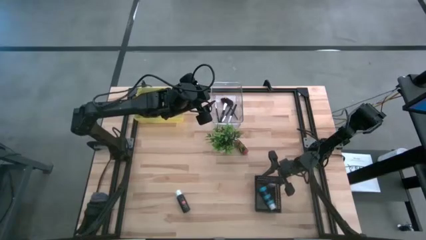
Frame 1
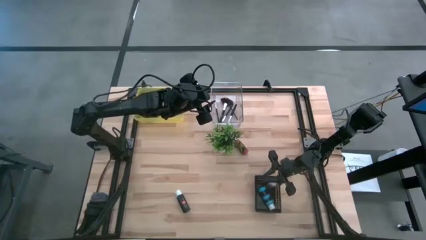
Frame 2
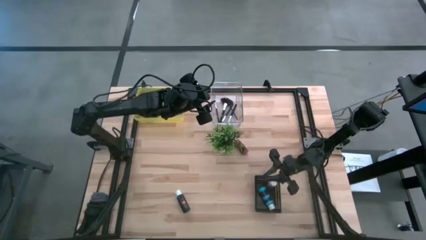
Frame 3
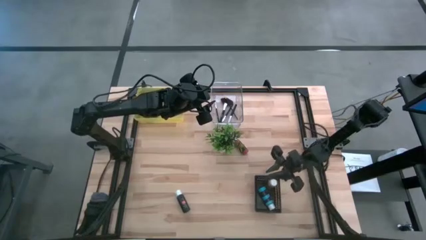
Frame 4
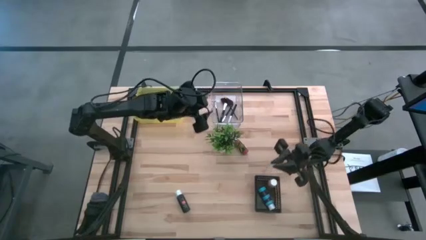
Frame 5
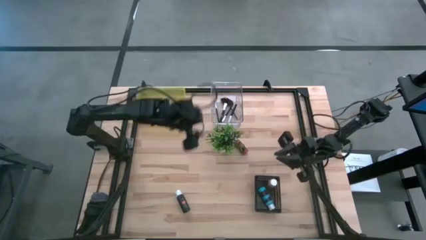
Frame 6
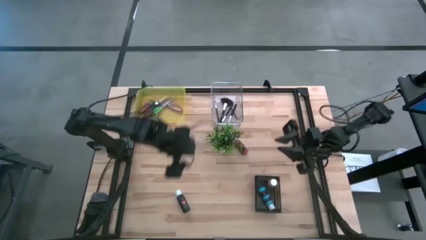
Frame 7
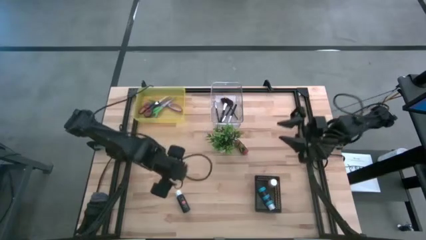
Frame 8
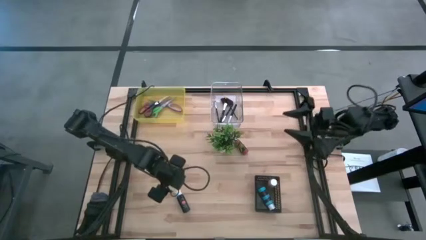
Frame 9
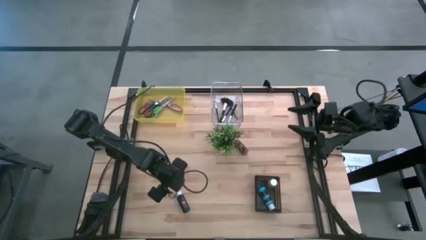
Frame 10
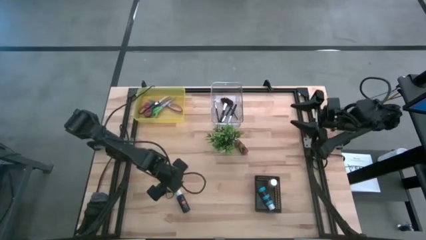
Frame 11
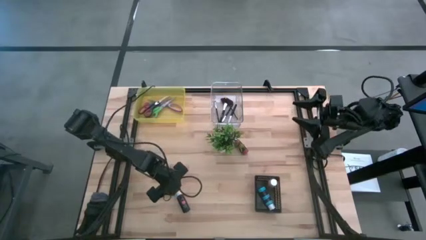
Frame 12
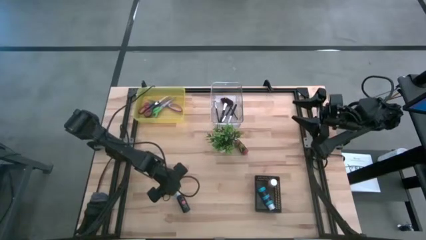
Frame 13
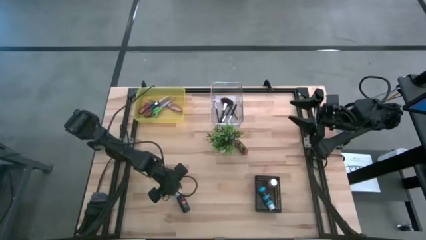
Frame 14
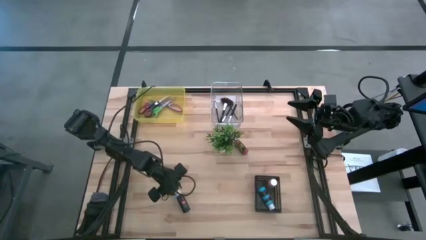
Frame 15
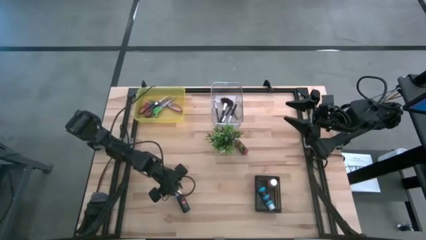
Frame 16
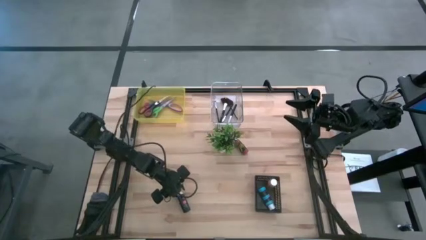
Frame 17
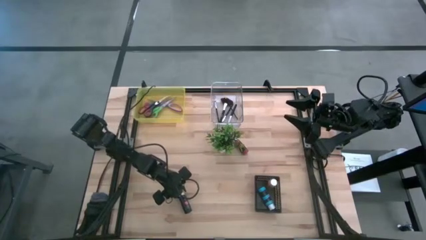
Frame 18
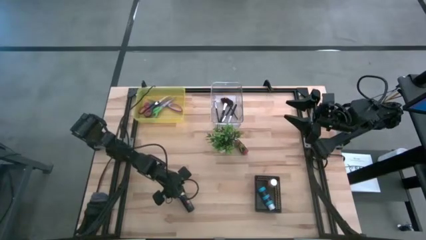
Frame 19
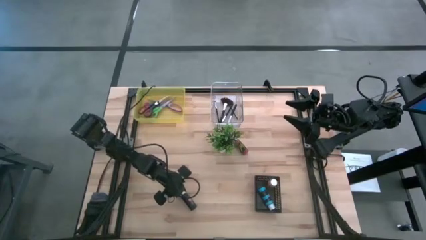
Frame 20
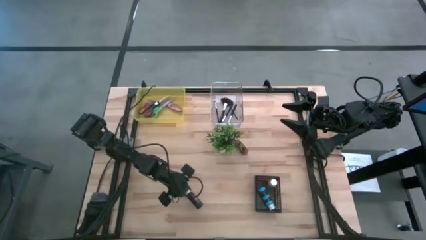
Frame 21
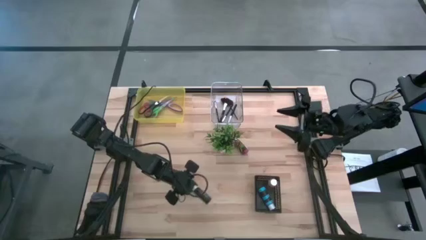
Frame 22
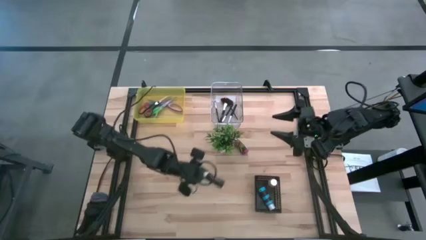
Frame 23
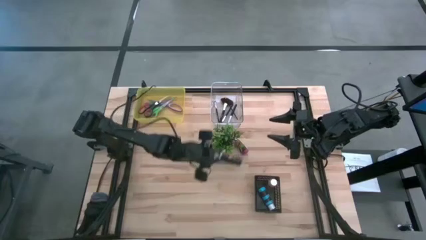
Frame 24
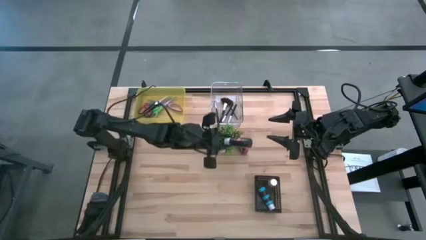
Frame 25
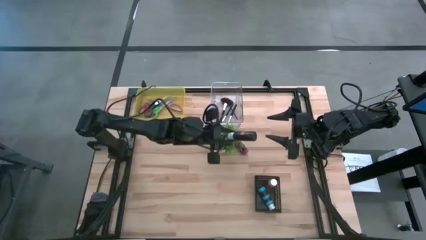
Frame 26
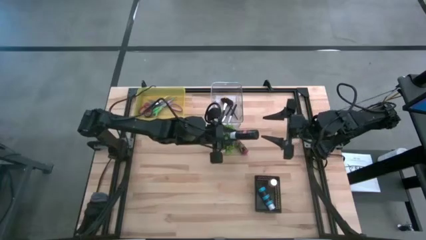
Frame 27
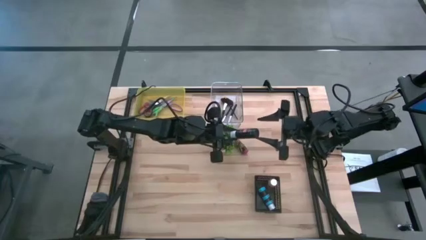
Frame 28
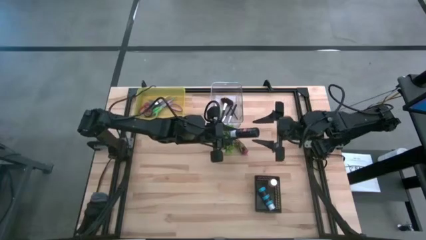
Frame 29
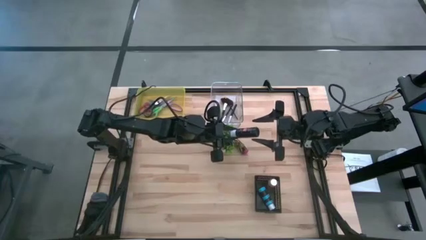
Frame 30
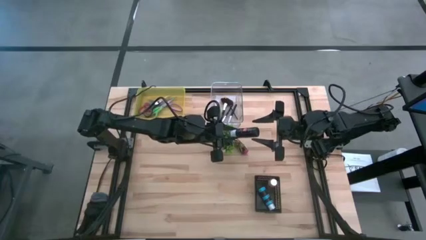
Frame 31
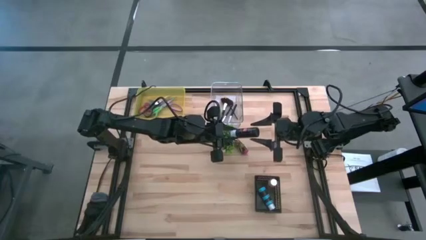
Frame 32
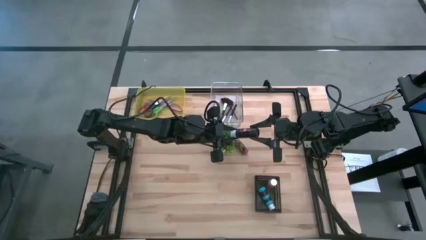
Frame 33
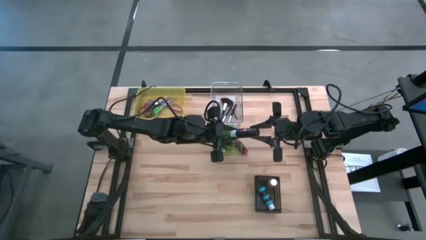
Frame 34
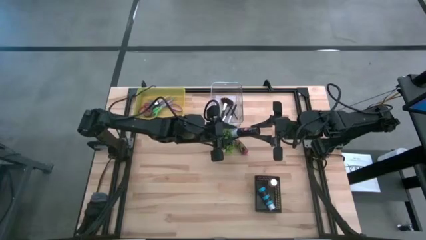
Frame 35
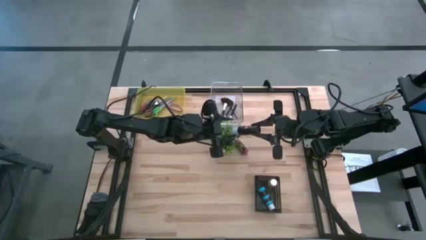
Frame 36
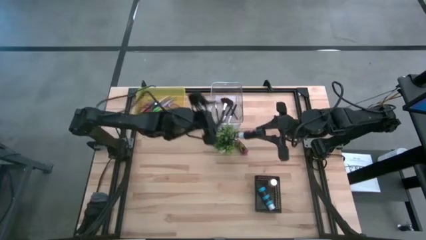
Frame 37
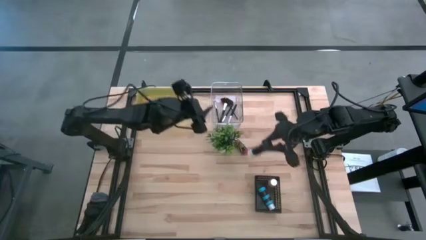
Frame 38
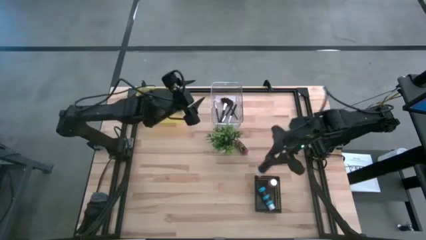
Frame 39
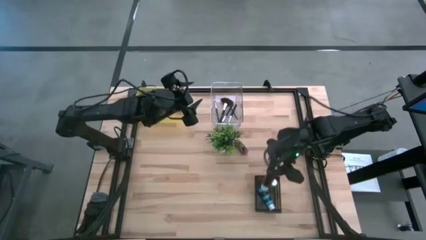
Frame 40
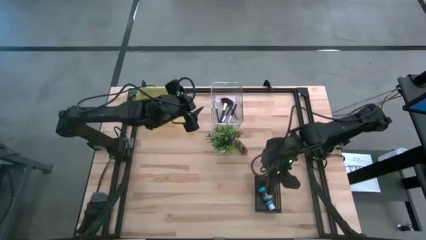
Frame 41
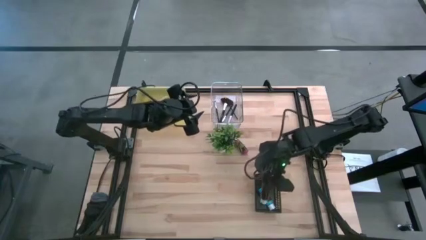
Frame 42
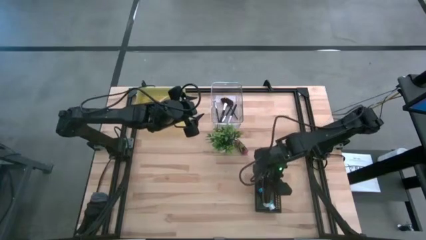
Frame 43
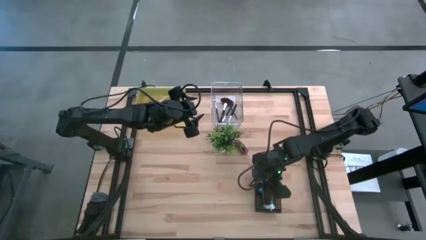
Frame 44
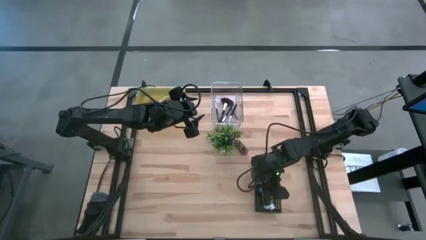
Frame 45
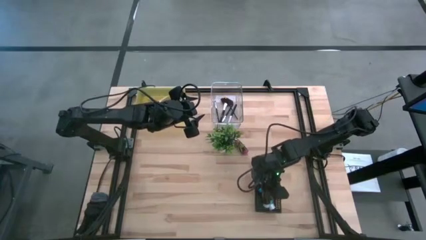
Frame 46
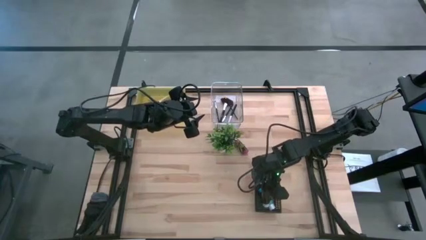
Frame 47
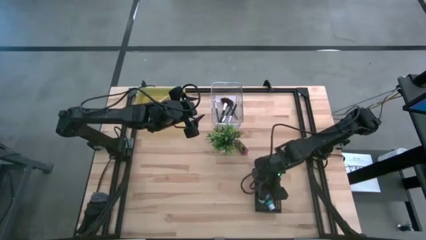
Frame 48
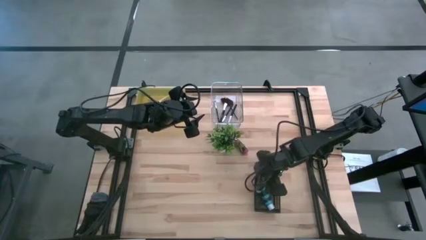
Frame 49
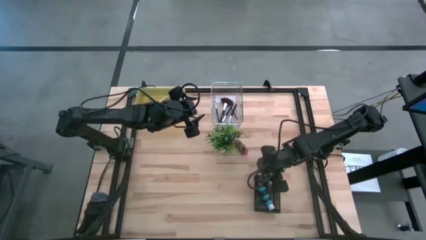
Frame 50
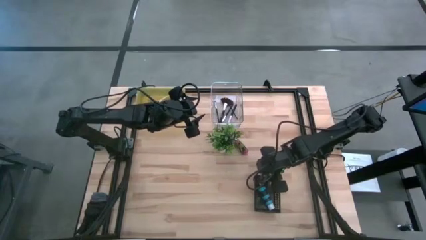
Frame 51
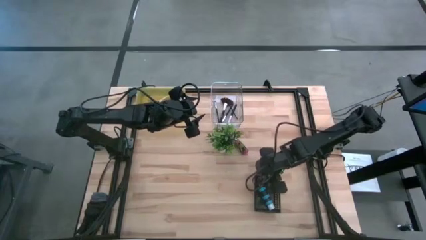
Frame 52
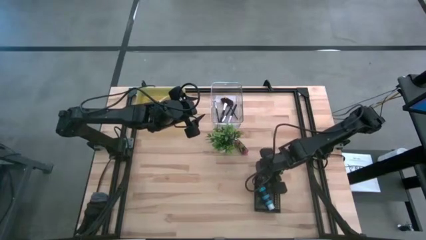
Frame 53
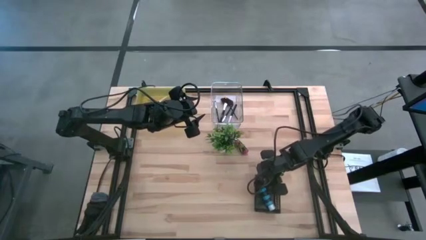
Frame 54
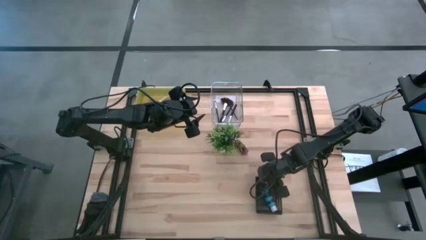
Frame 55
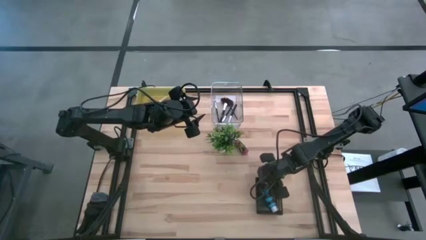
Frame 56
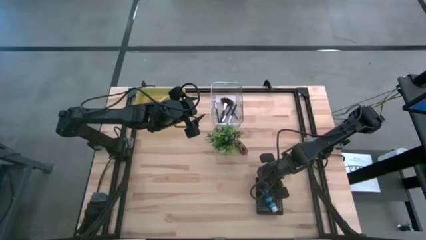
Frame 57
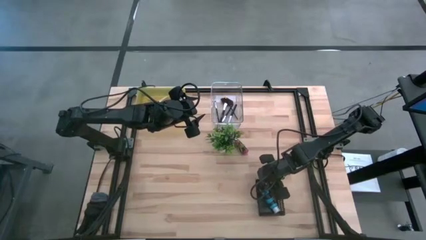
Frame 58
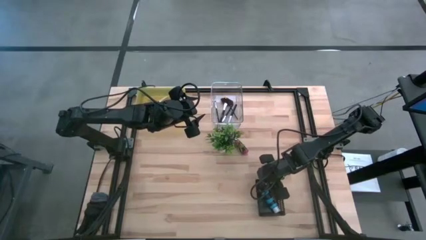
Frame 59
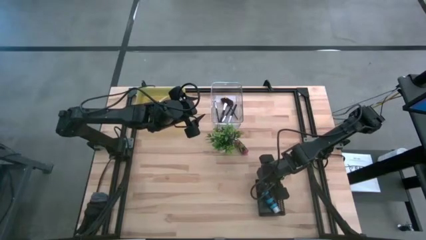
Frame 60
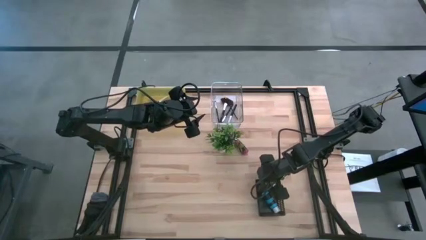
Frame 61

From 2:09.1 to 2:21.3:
Task: Pick & Place Paint Supplies
Put the black acrylic craft paint bottle into the black bin

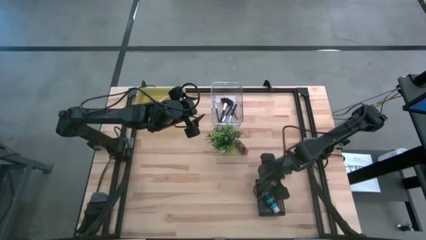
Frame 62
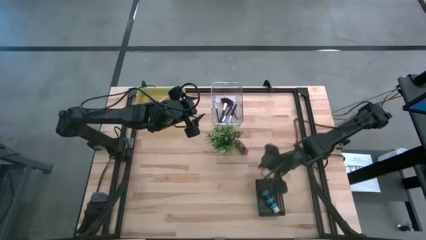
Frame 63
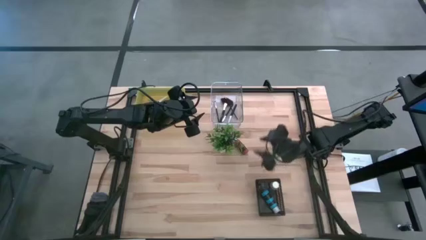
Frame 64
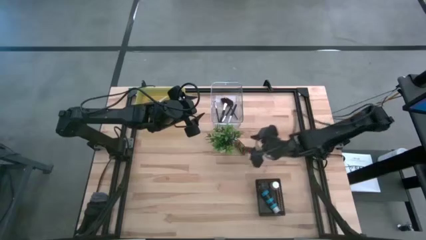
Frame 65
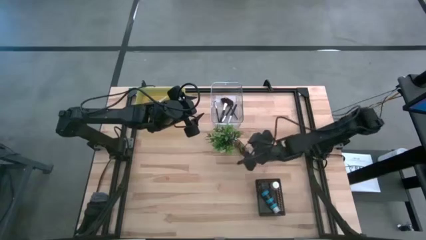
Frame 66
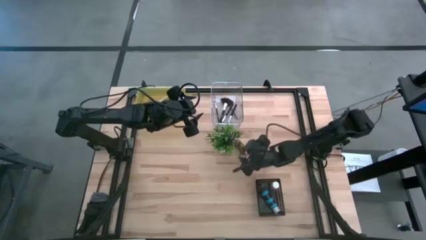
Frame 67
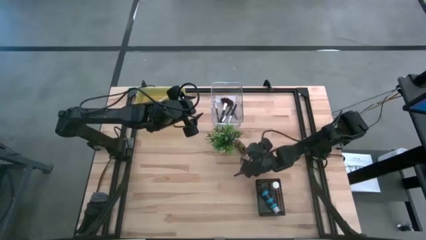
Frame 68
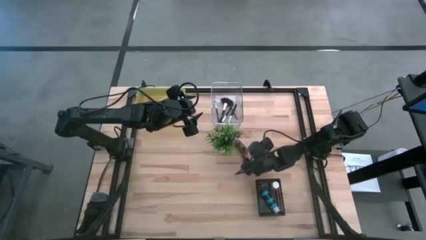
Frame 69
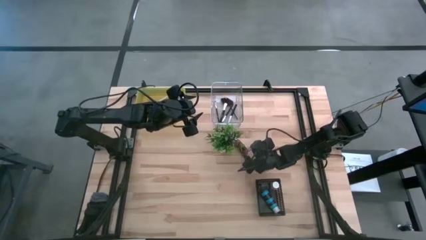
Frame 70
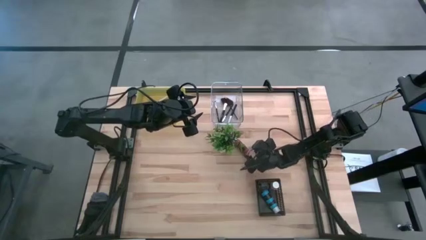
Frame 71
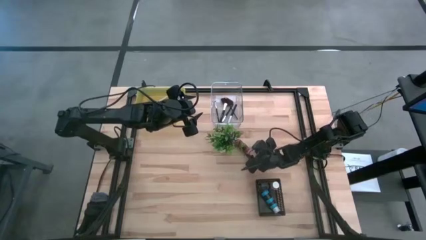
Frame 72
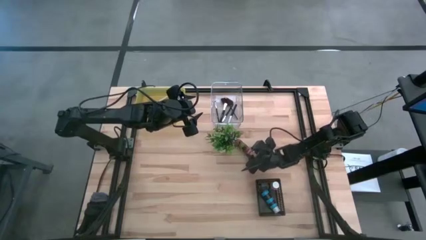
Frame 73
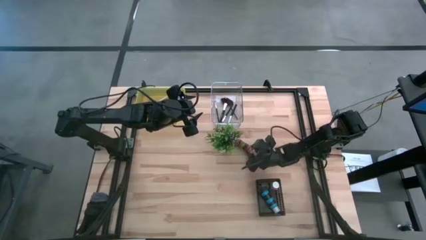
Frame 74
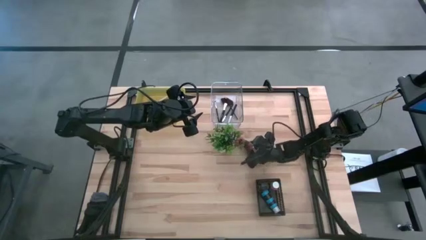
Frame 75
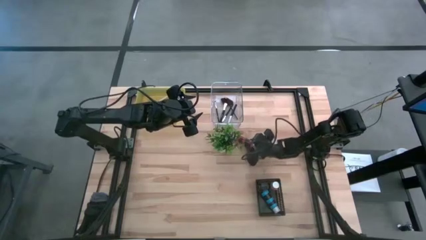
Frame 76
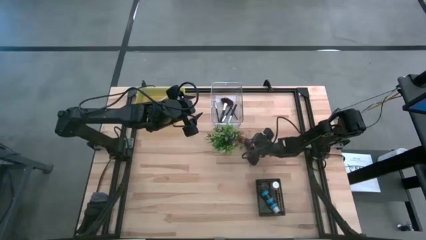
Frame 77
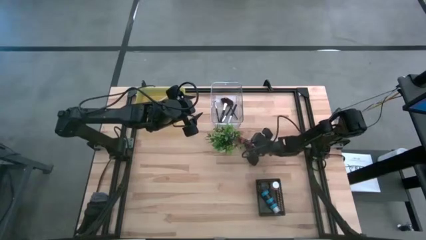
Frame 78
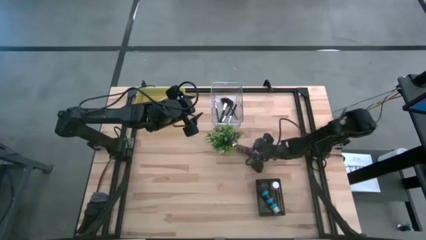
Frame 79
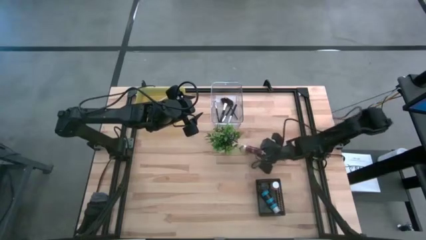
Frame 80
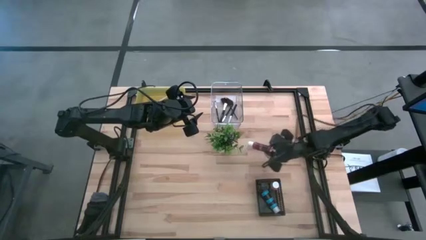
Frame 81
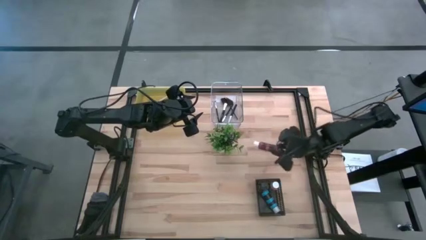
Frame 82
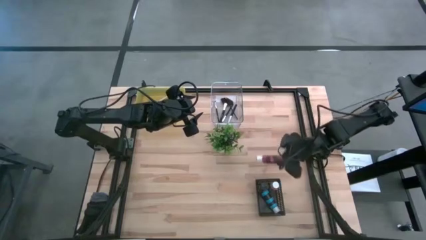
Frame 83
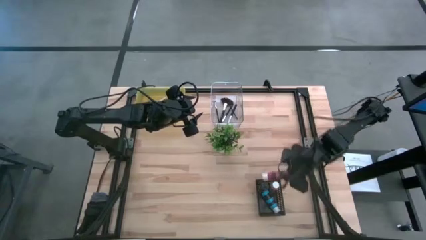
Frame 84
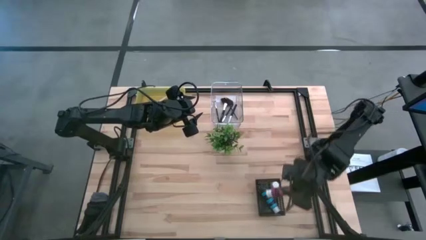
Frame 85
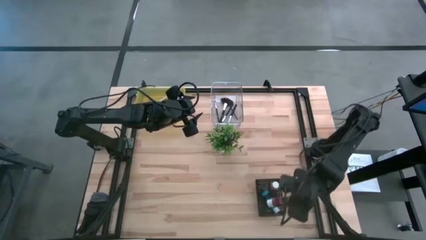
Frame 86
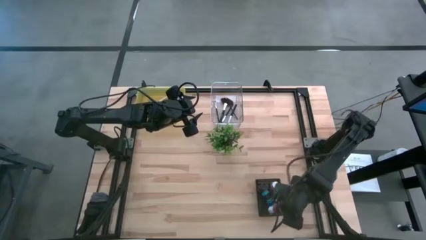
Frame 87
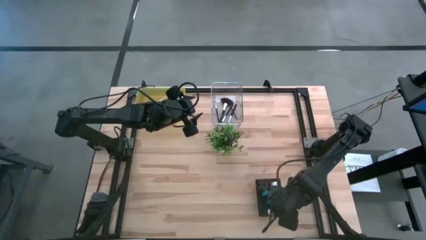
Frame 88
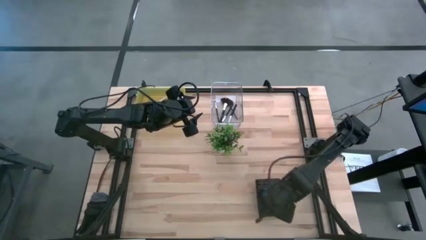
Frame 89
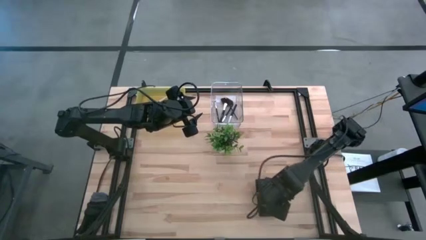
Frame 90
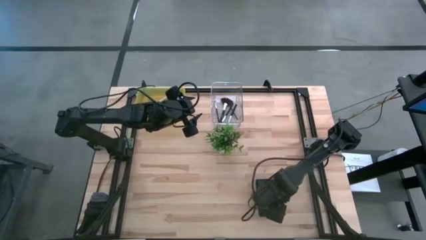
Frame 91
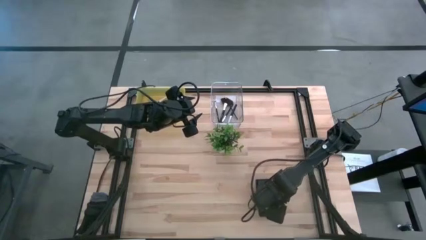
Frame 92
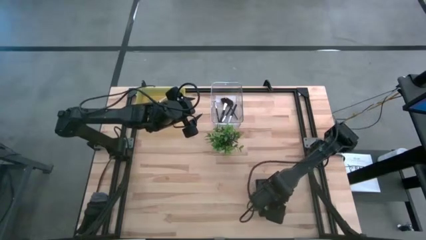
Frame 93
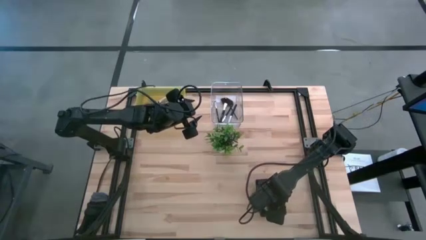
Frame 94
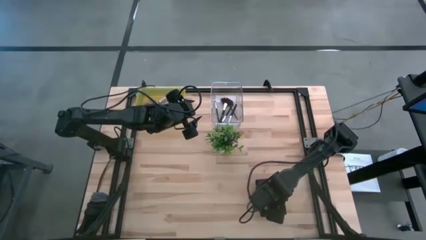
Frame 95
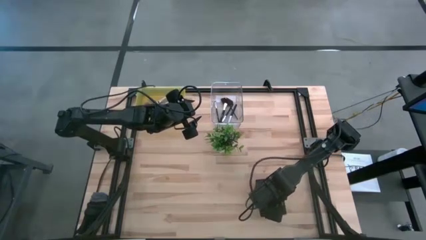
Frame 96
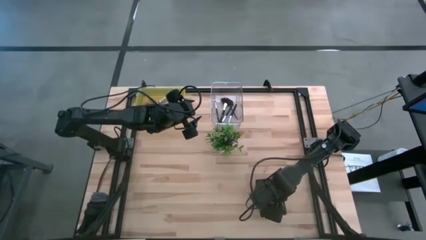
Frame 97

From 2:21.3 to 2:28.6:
Put the red paint bottle into the black bin
